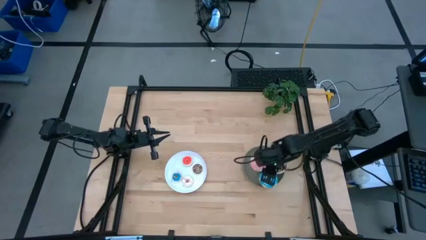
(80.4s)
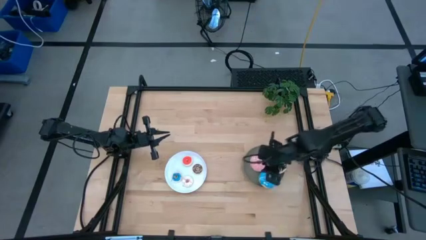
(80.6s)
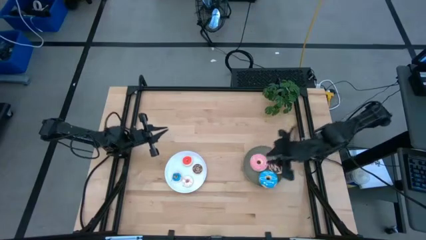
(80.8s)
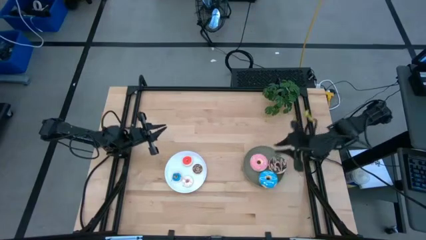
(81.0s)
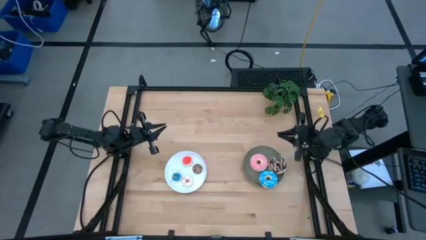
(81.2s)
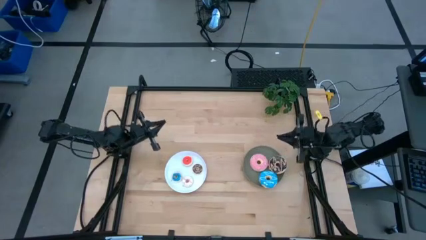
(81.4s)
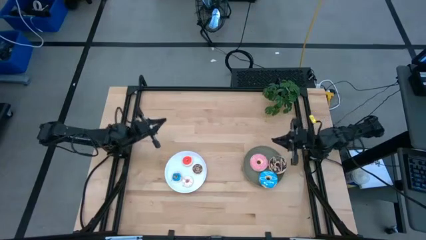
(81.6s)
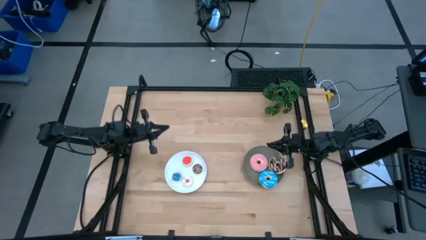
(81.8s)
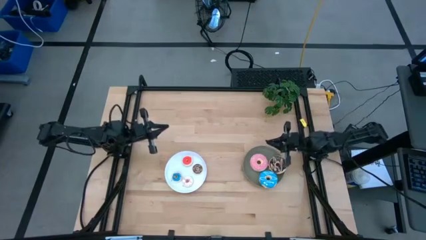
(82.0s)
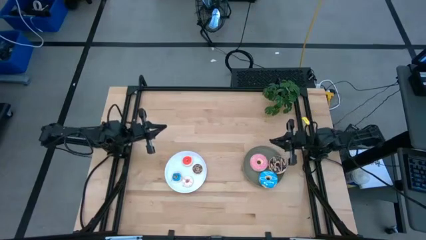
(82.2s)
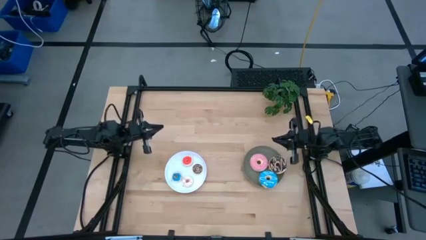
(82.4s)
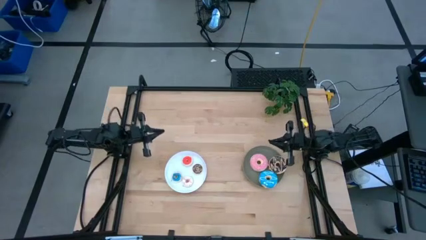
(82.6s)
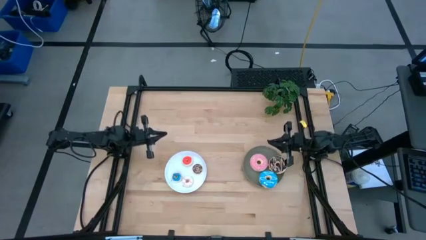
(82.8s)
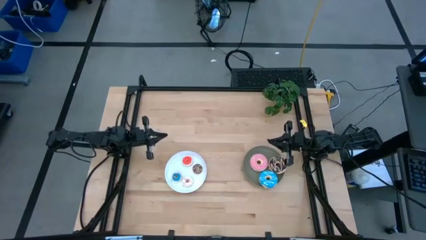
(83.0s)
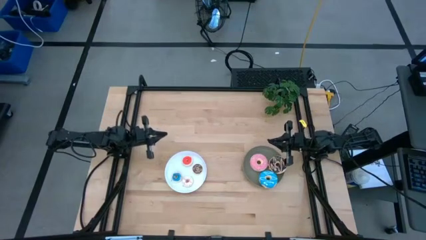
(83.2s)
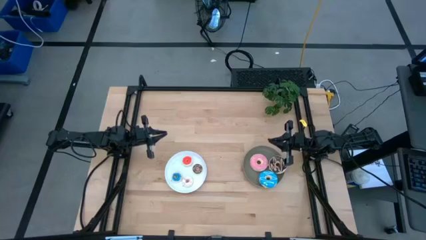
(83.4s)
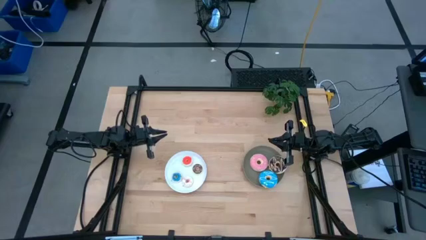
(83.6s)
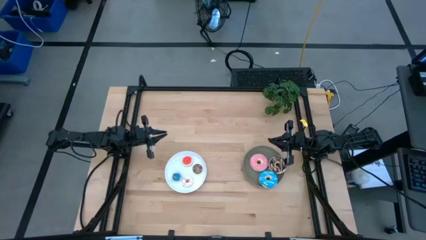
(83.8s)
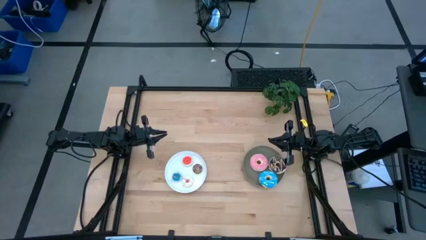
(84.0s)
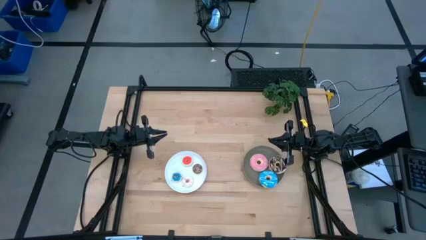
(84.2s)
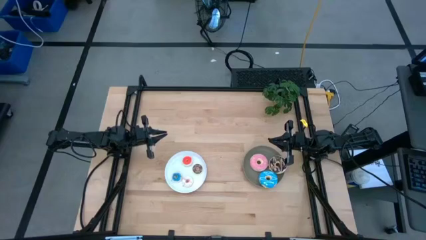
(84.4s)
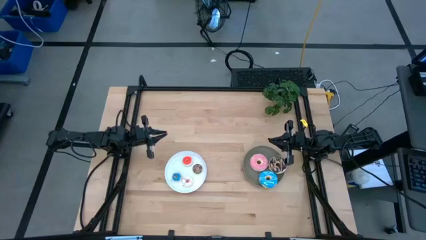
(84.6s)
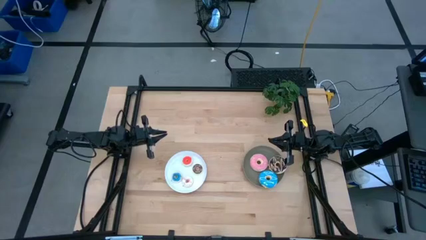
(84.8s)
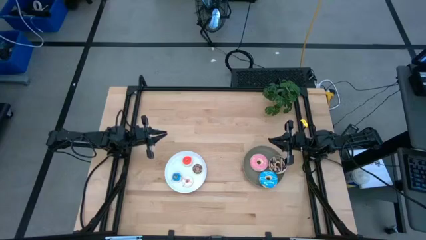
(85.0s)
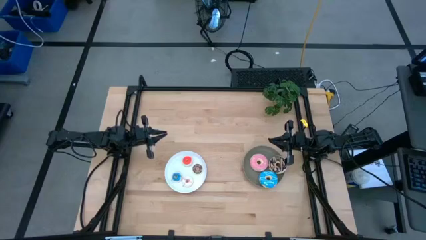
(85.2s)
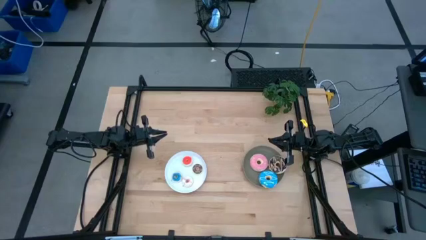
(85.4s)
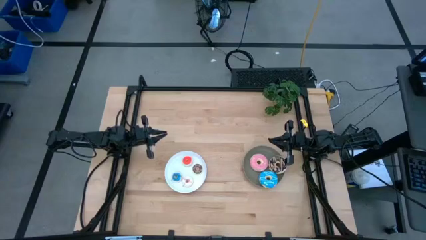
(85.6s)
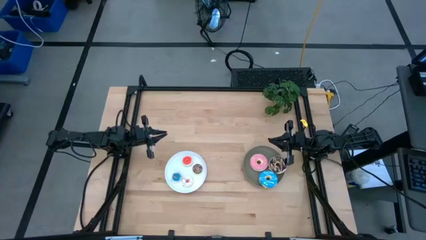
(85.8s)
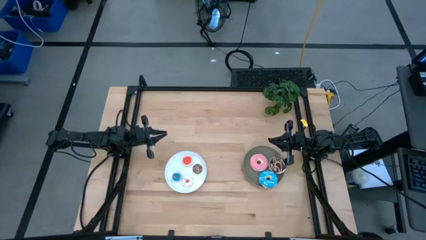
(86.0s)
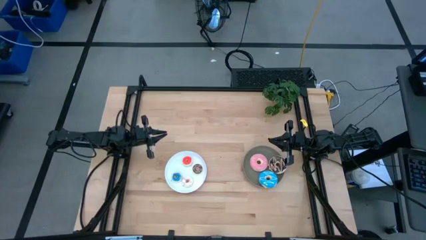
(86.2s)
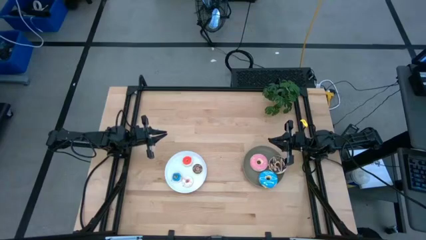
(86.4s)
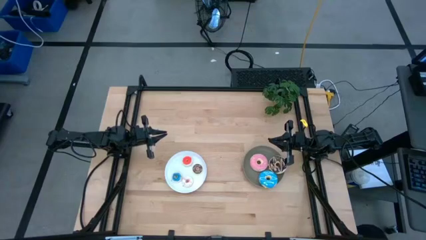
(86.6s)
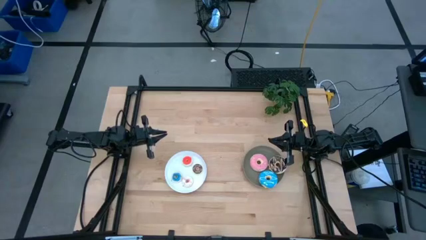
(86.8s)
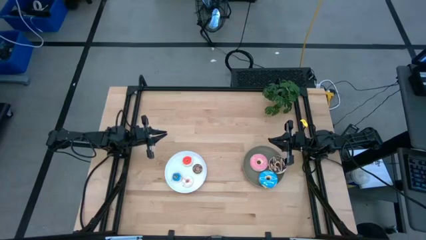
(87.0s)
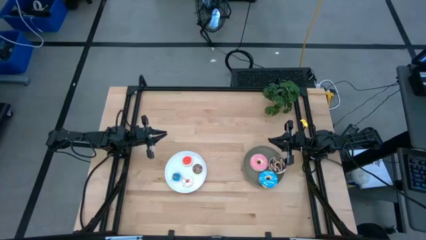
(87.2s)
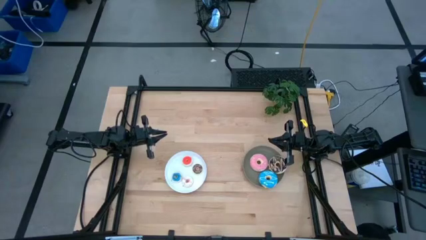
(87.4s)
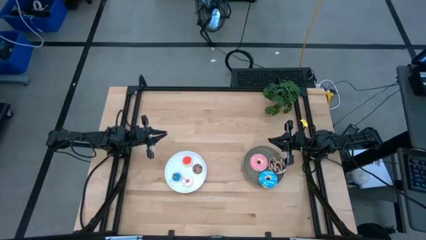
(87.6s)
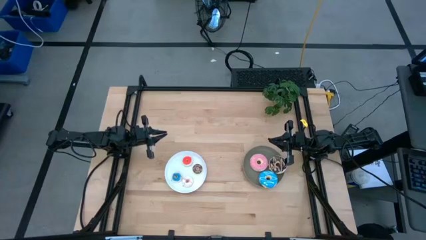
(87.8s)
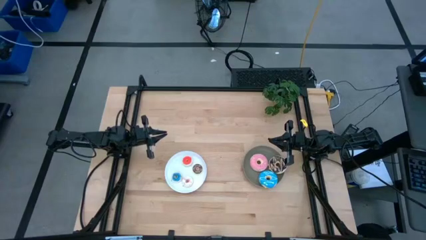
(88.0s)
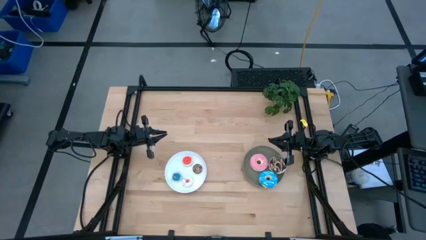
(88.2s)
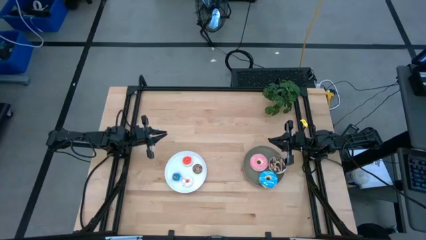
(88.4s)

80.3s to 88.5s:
Task: Pick & Place donuts
Return to Home Position

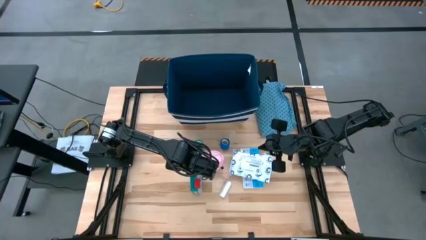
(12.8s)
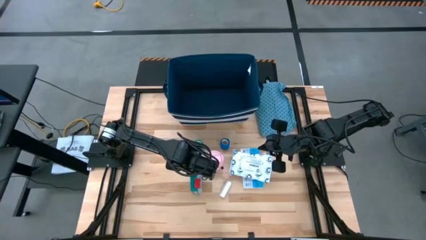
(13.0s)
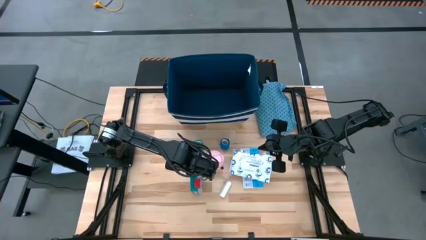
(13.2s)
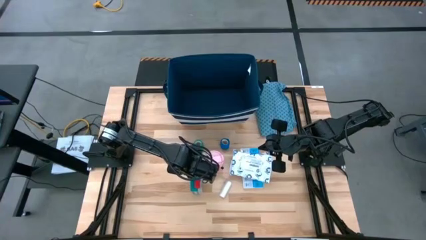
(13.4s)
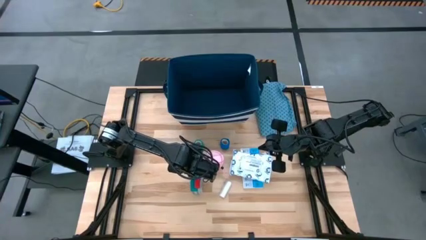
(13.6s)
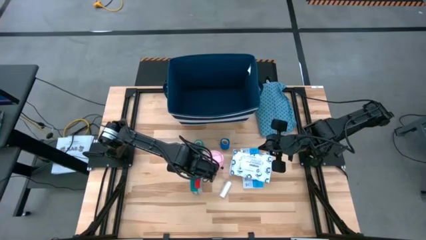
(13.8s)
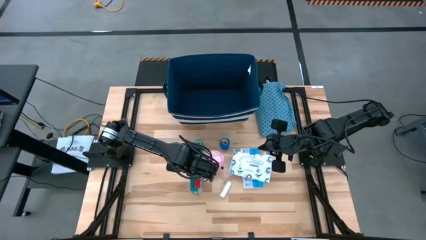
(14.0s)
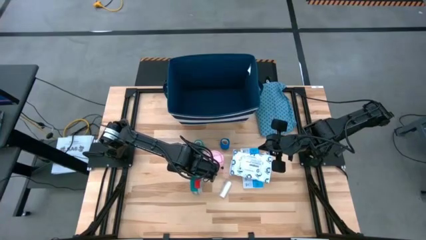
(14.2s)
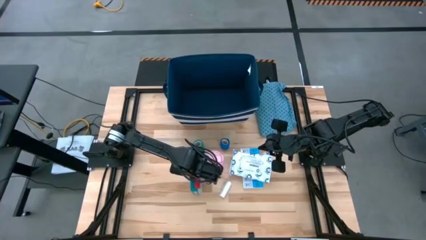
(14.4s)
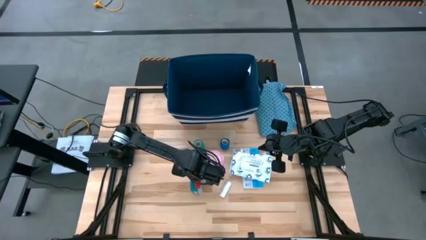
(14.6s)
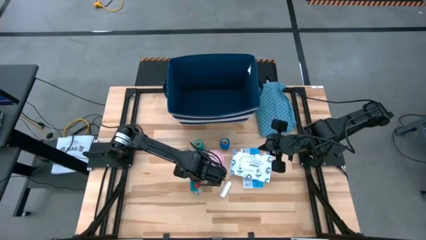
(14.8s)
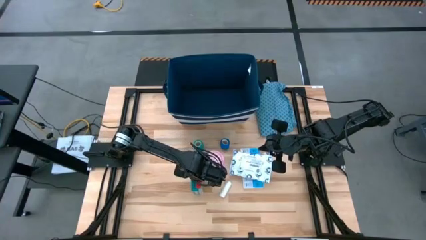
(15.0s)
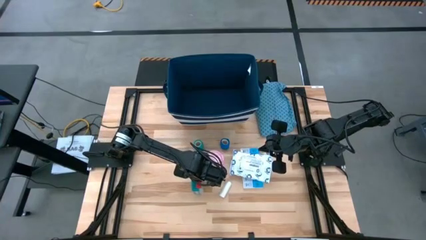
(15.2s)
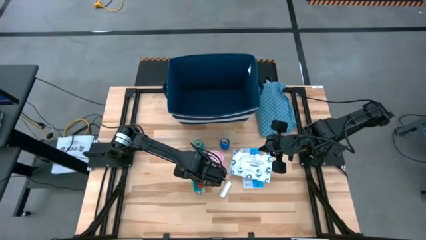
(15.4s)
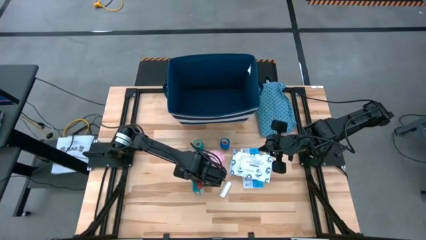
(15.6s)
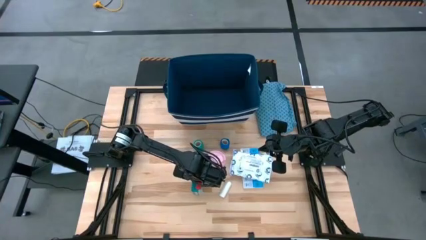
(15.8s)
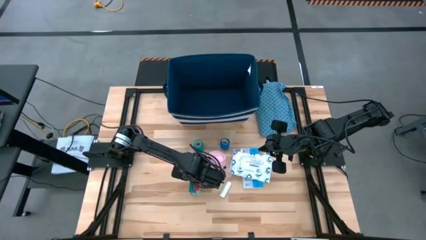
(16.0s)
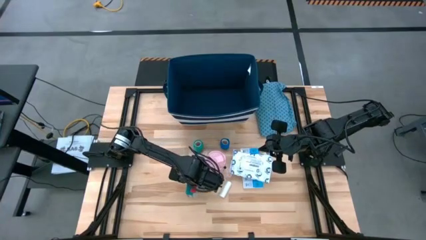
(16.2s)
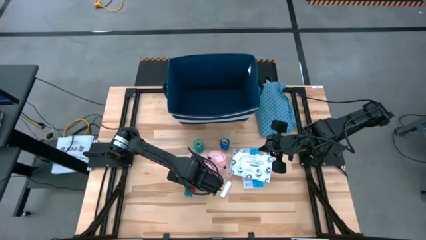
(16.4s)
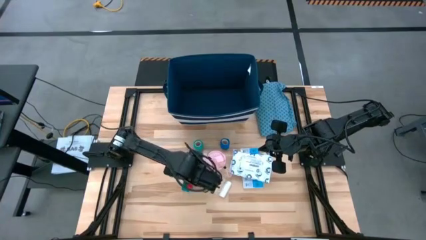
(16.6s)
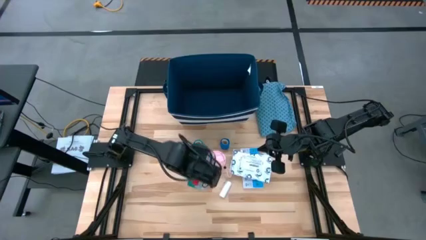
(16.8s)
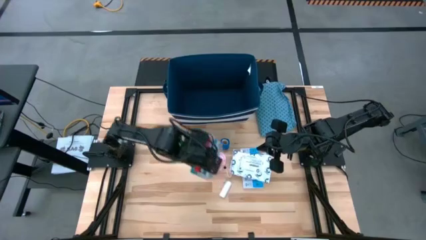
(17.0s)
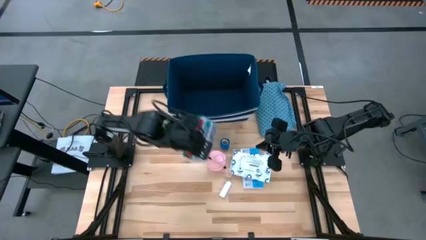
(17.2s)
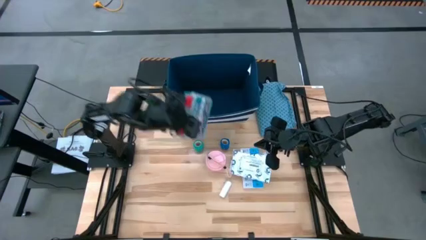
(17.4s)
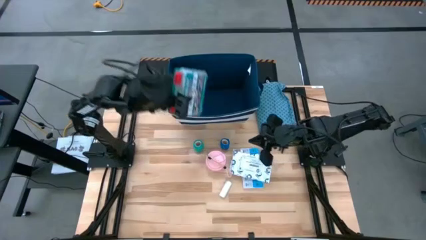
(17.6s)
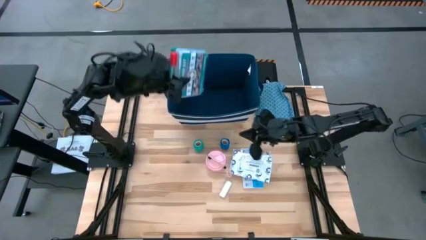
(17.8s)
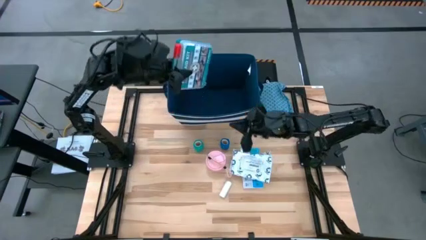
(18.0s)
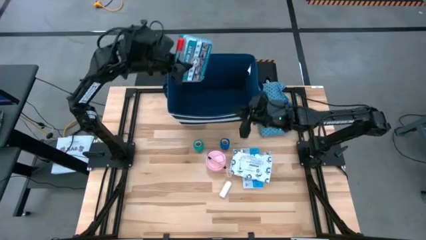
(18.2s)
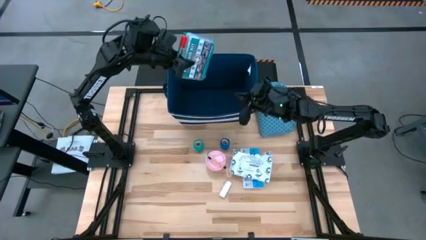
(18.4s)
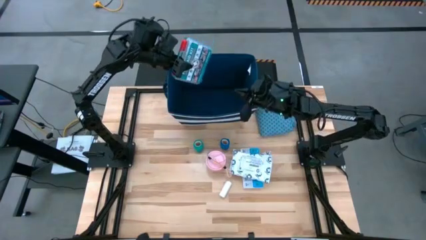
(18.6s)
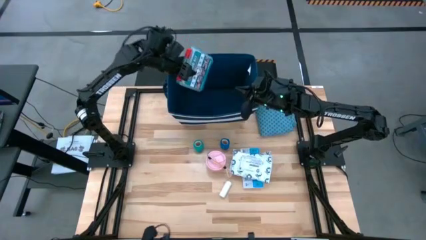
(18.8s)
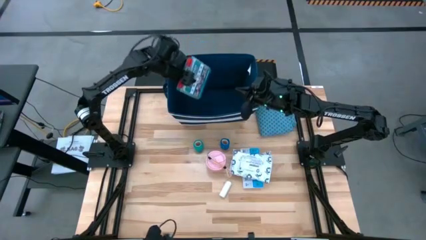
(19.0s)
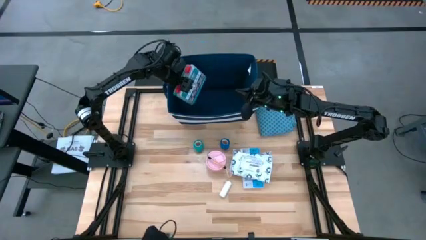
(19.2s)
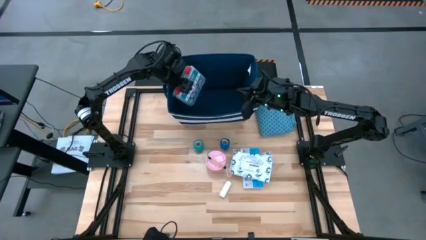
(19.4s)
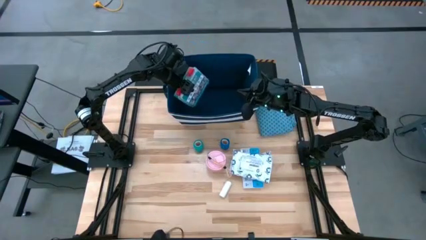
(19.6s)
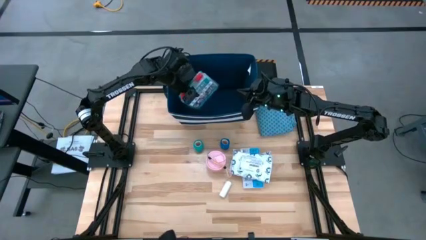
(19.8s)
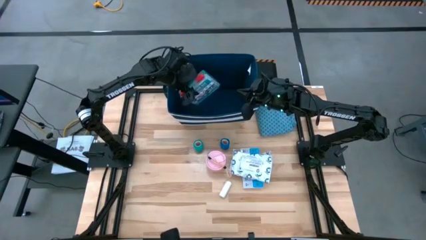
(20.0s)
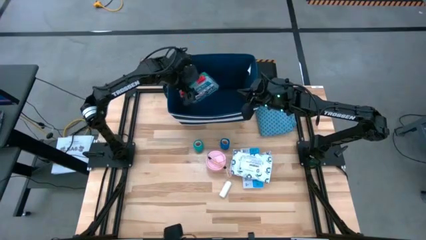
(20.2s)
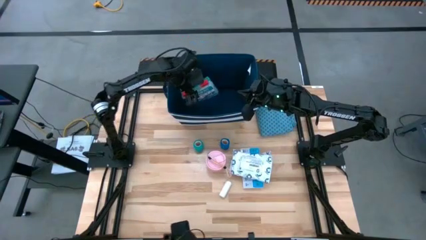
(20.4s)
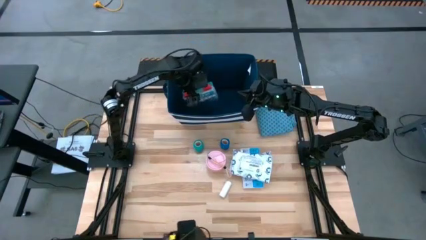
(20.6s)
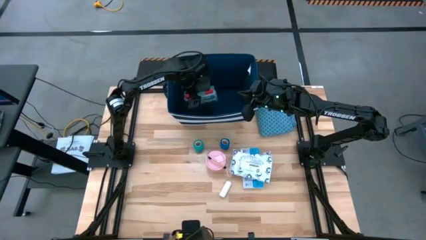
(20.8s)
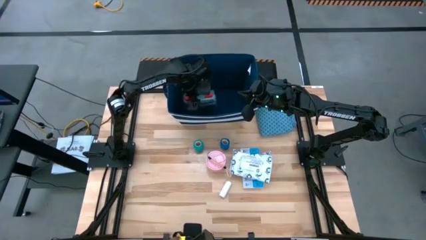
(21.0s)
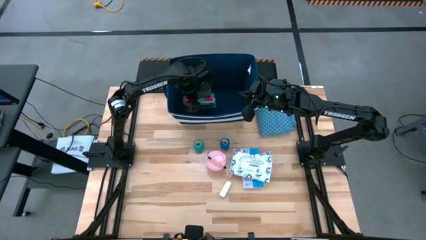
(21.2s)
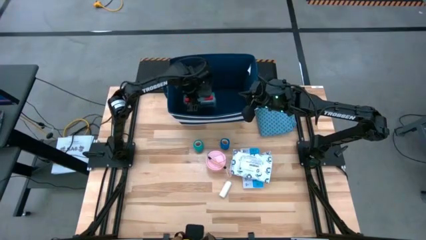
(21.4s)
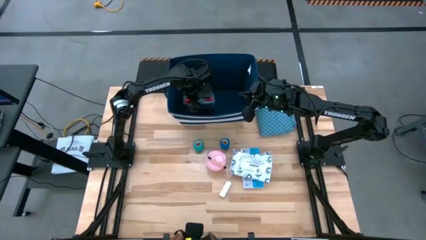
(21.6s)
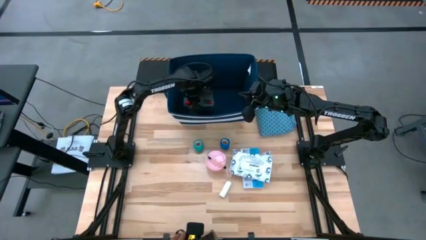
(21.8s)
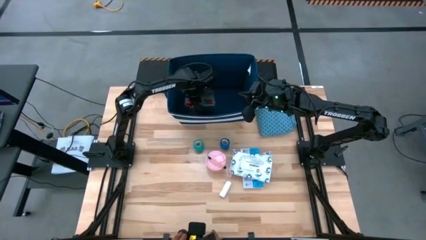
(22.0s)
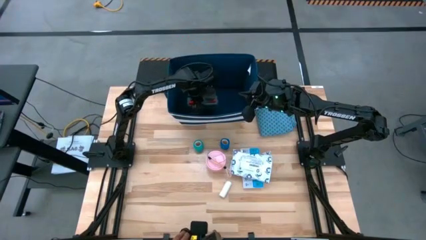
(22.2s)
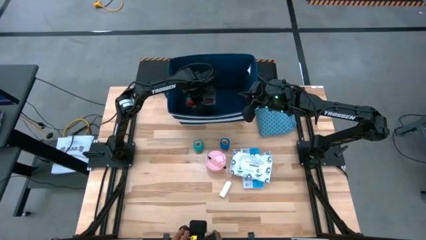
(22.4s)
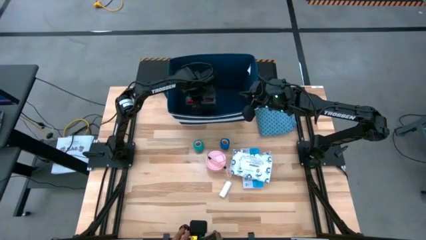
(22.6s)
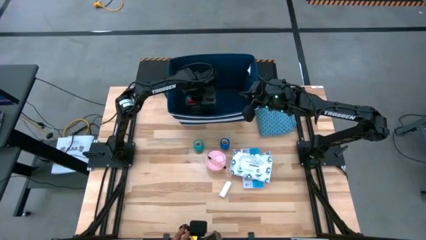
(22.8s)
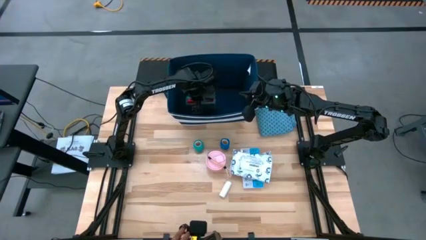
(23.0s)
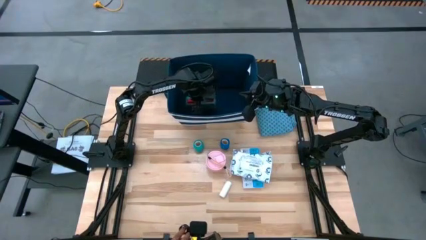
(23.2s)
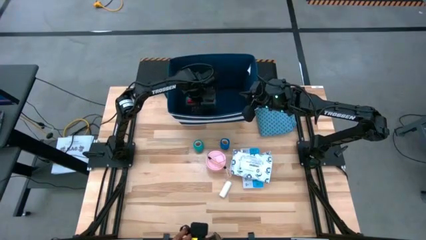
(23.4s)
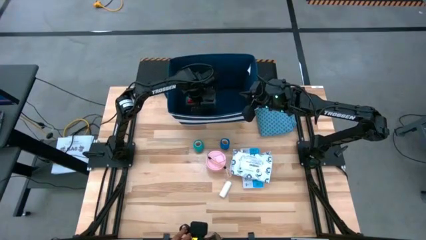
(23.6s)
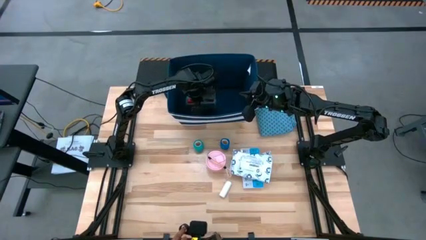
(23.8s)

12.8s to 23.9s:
Task: Pick & place medical supplies in basket/bin
Put the first aid box into the bin
